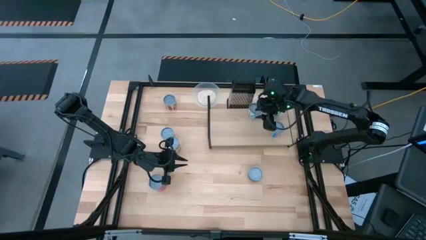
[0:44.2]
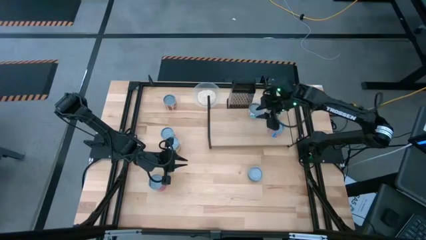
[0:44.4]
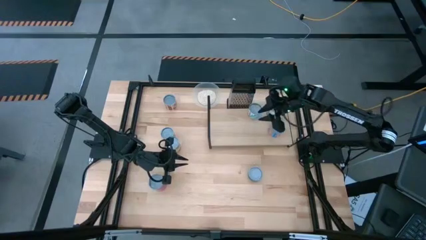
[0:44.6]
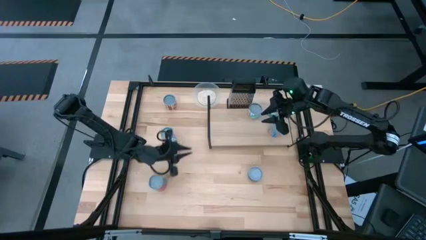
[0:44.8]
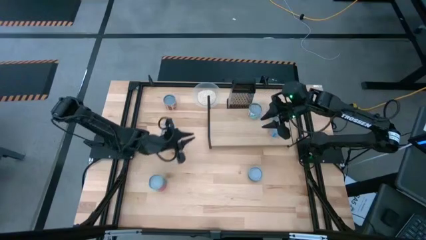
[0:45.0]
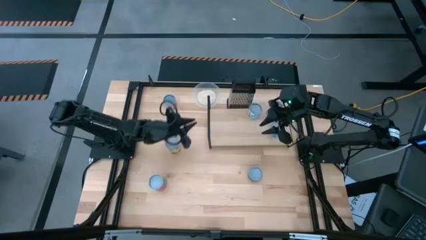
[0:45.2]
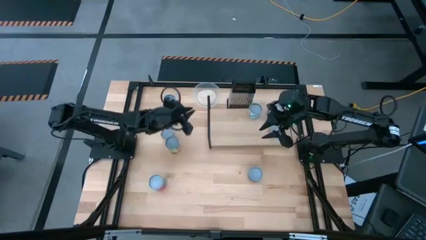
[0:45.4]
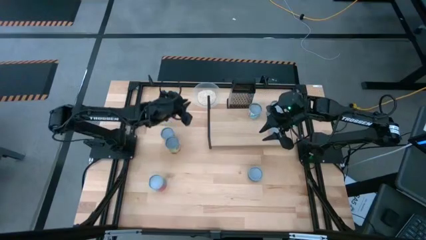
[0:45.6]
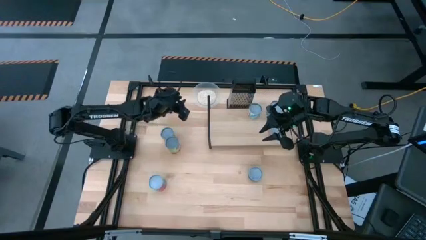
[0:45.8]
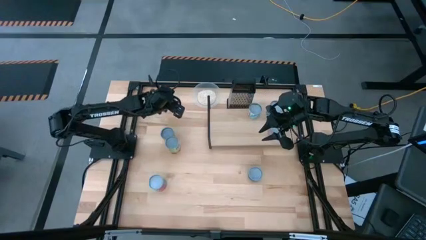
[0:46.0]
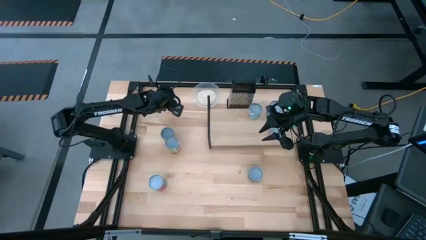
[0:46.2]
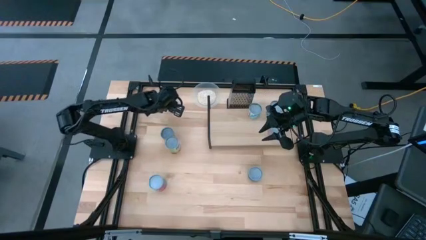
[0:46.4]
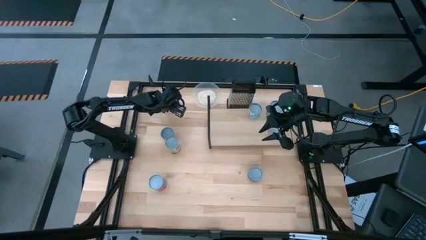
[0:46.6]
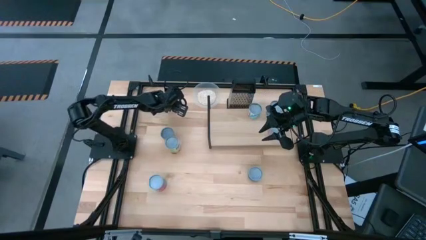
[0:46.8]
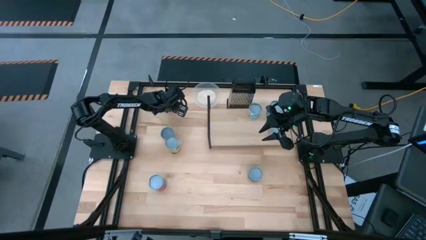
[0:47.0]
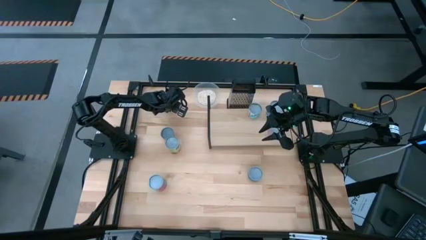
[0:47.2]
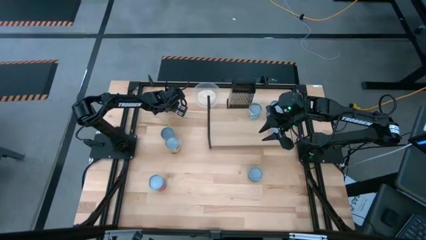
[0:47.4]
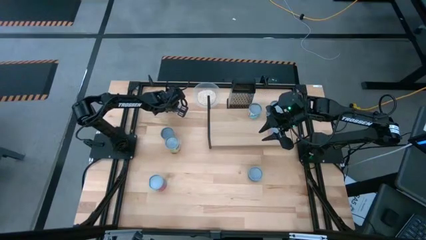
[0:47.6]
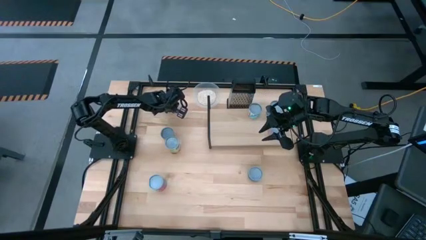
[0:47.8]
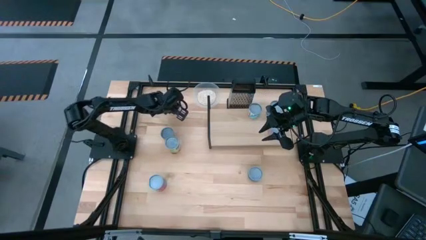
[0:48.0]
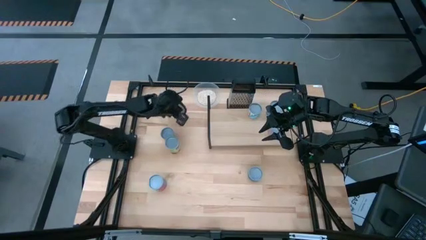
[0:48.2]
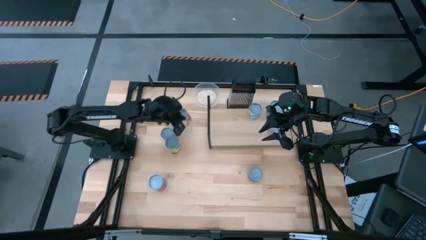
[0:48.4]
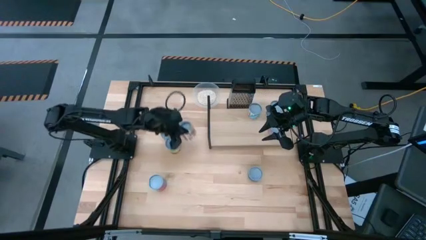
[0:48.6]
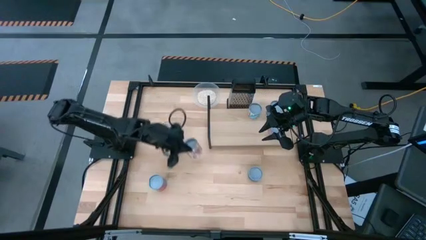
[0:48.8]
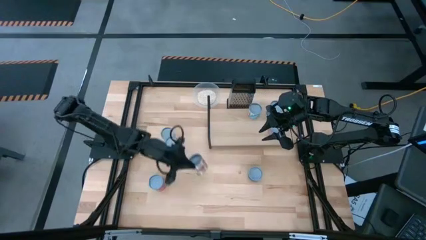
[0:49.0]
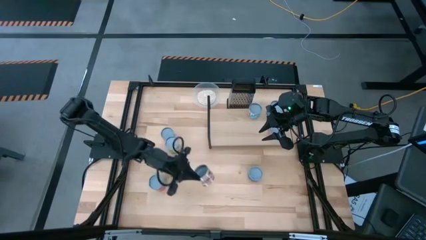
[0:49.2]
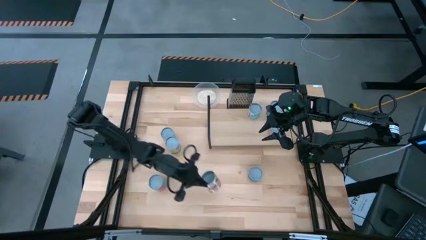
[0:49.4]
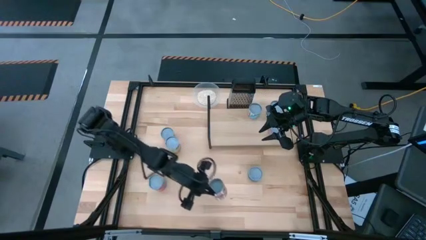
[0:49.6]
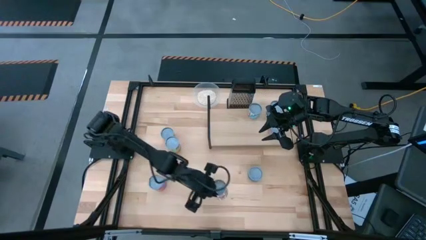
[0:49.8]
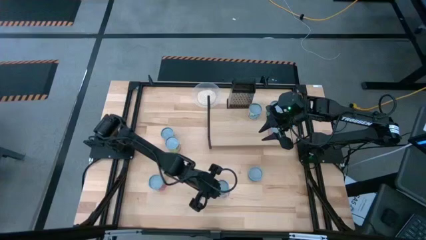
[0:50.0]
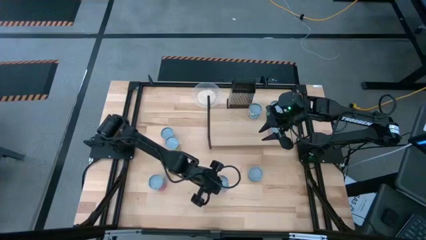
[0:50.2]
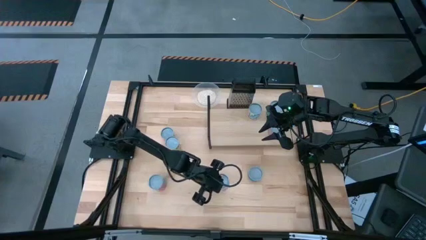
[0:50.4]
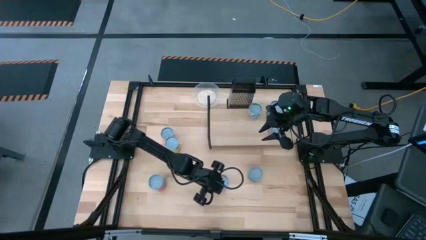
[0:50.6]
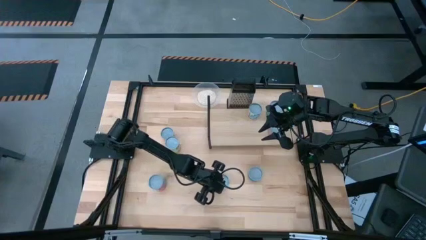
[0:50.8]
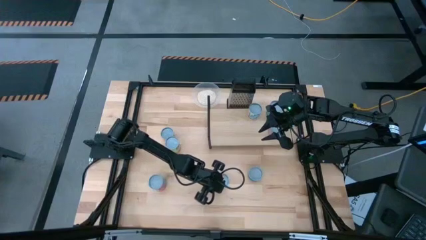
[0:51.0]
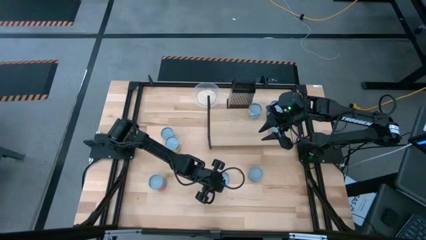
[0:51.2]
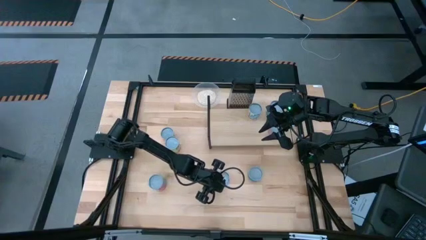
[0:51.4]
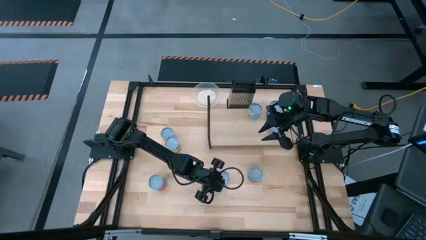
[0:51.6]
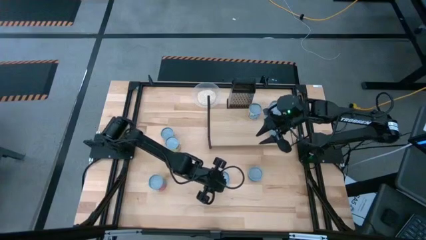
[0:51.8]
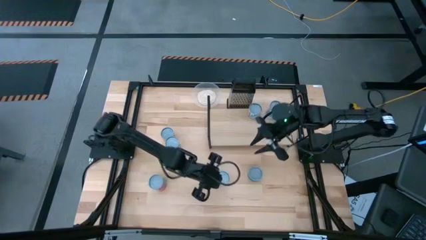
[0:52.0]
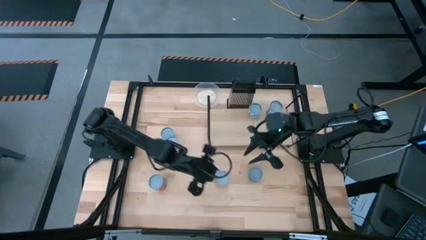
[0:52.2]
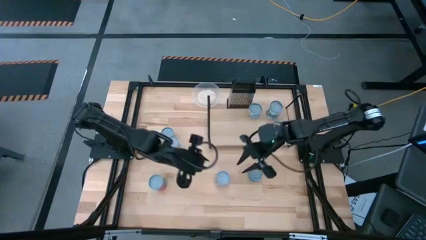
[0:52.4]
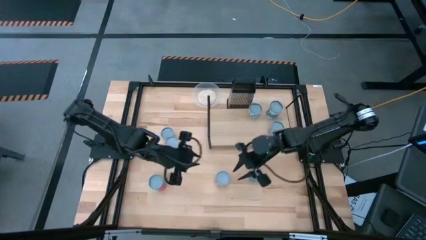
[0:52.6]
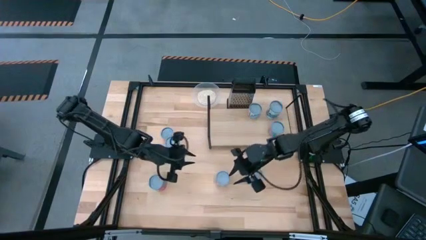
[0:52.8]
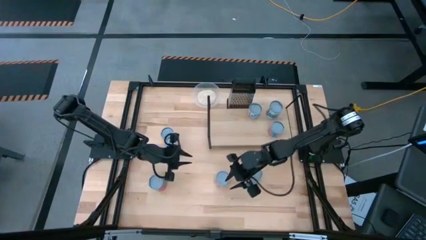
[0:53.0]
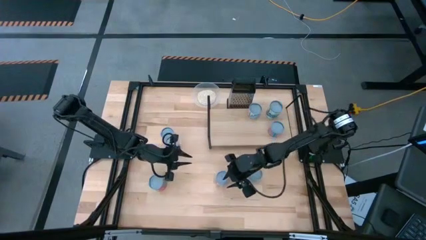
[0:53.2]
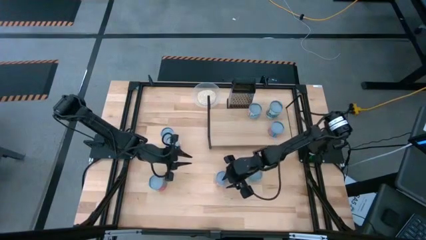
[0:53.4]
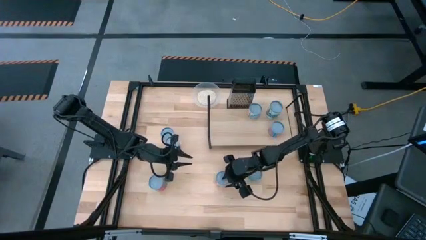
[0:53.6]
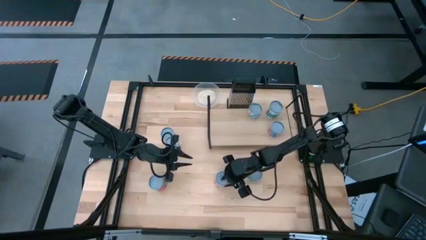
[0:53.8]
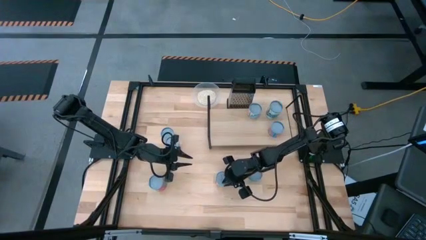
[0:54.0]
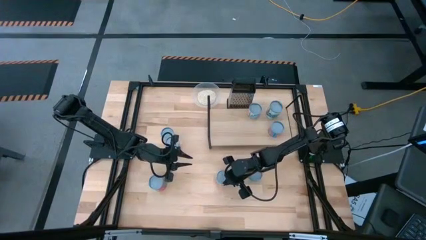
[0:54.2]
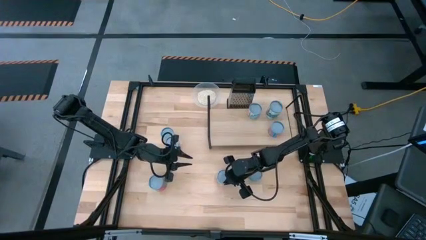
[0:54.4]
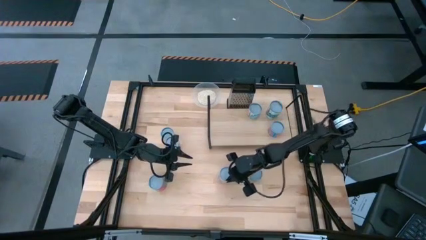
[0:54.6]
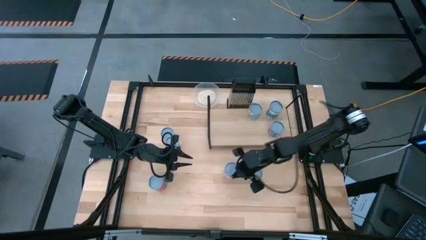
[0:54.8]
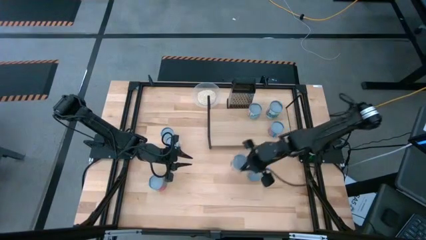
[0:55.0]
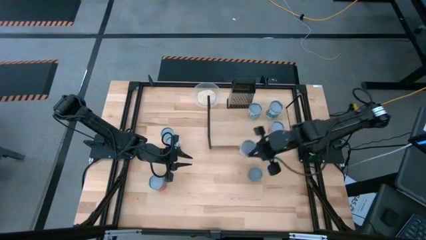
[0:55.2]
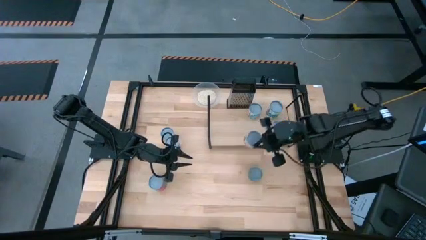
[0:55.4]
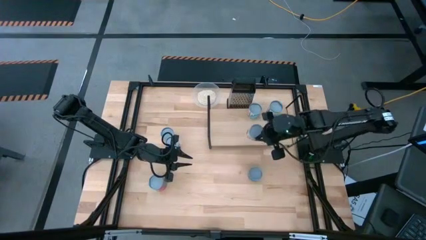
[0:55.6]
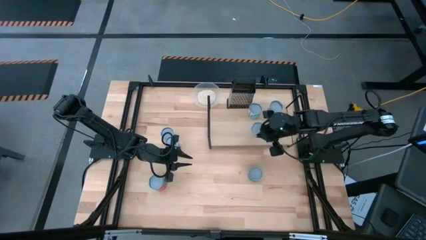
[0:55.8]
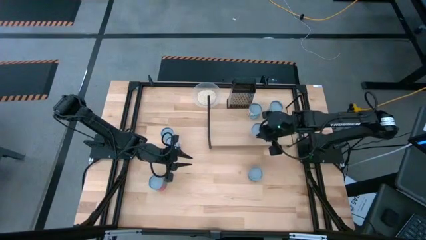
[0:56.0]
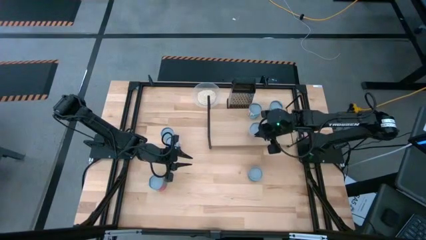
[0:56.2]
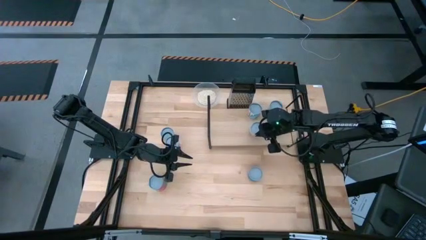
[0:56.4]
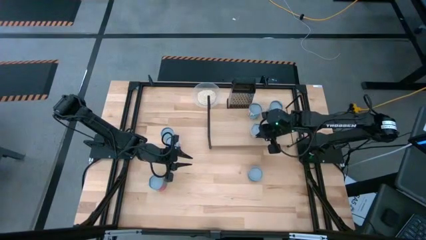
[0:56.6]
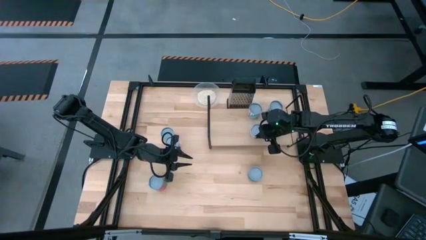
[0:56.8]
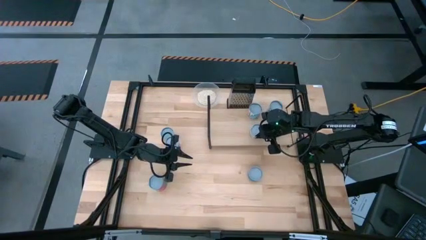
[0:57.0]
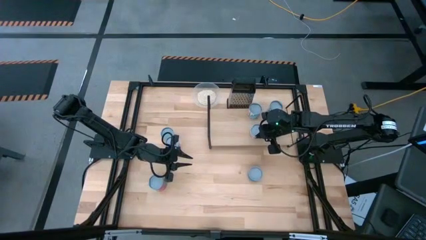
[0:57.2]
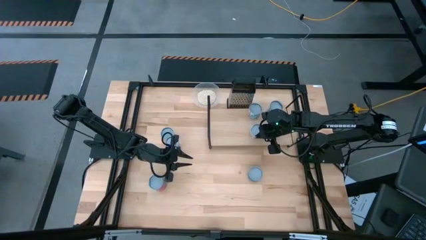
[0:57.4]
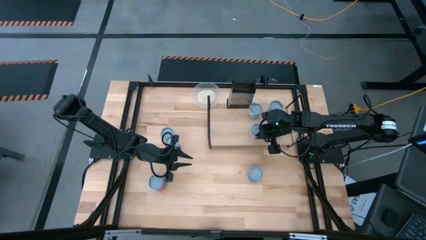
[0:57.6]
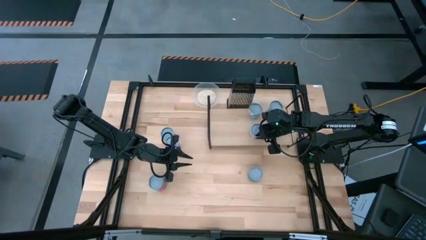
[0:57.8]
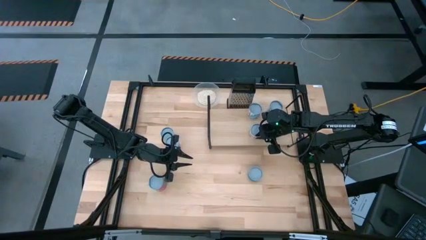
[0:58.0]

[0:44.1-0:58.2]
Task: Pick and place cans onto a shelf
Put the canned diced tomatoes on the shelf
